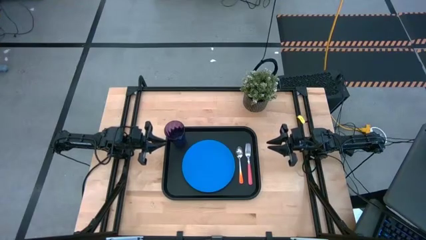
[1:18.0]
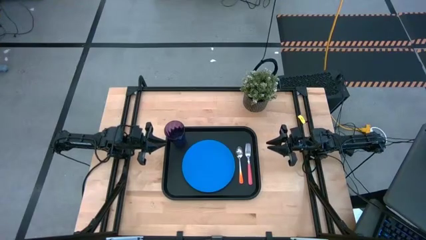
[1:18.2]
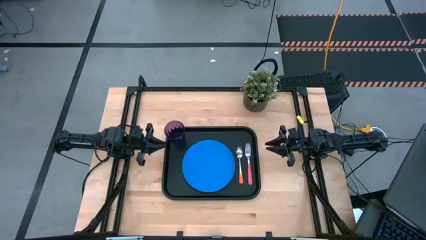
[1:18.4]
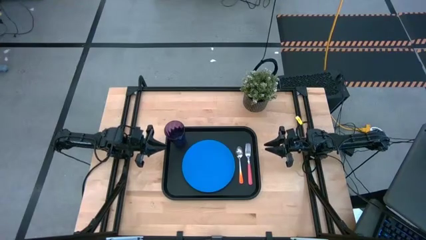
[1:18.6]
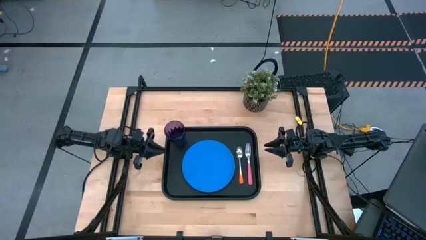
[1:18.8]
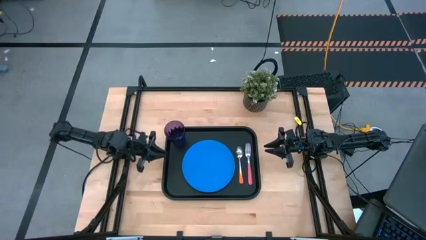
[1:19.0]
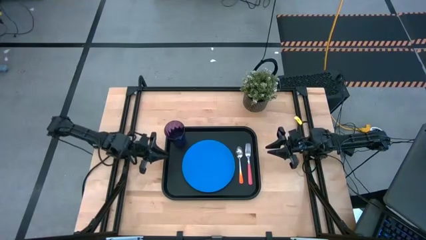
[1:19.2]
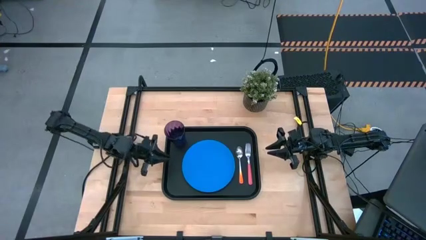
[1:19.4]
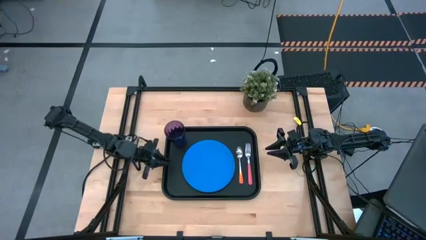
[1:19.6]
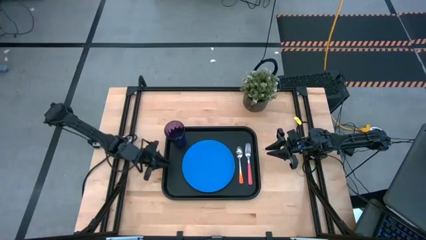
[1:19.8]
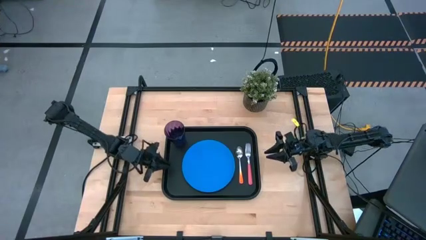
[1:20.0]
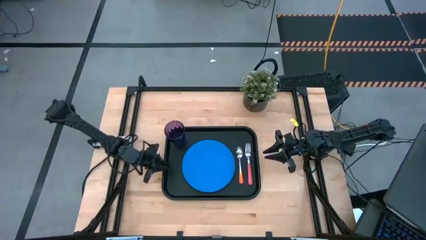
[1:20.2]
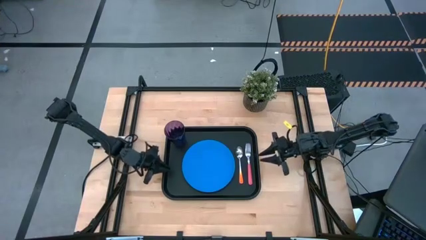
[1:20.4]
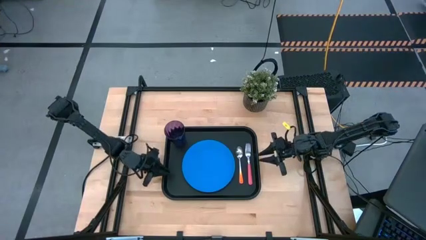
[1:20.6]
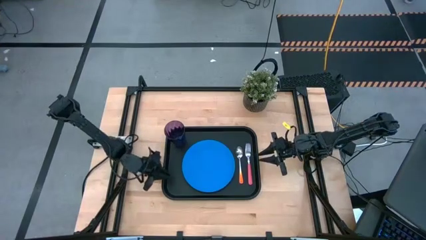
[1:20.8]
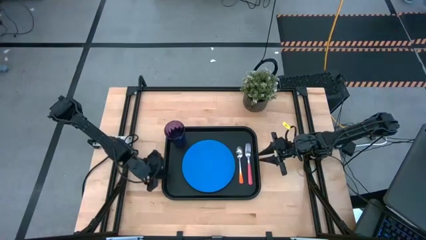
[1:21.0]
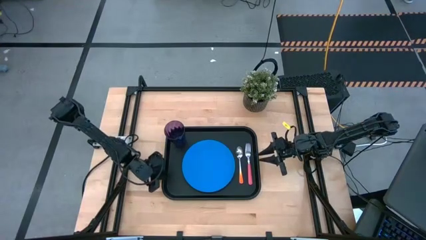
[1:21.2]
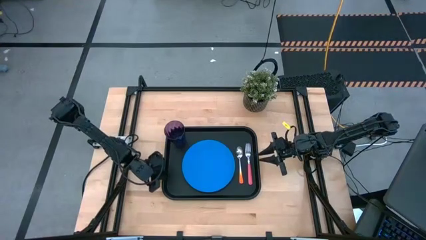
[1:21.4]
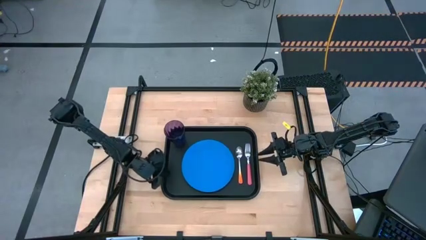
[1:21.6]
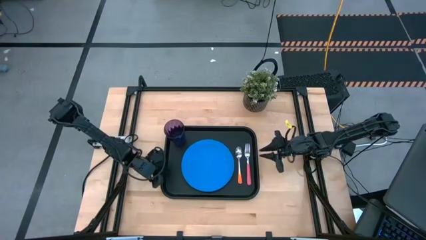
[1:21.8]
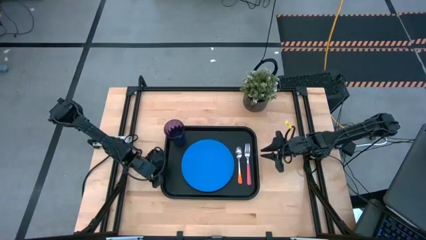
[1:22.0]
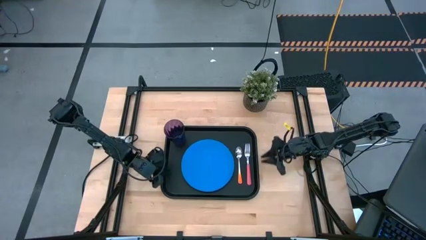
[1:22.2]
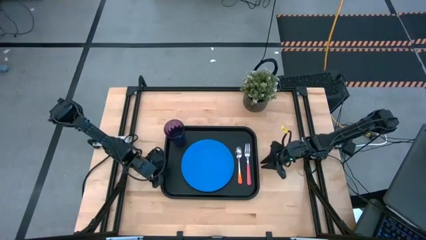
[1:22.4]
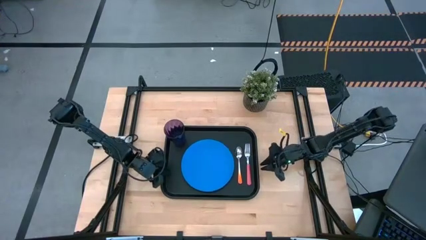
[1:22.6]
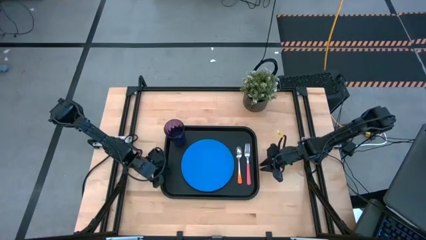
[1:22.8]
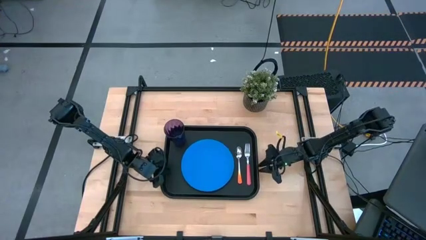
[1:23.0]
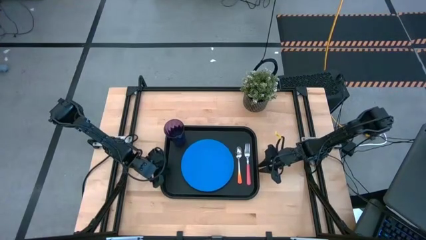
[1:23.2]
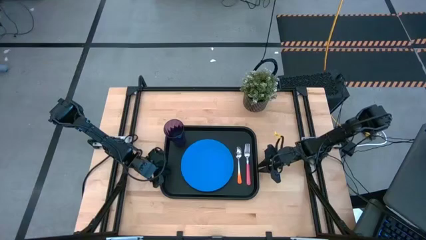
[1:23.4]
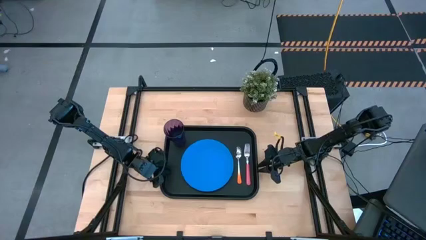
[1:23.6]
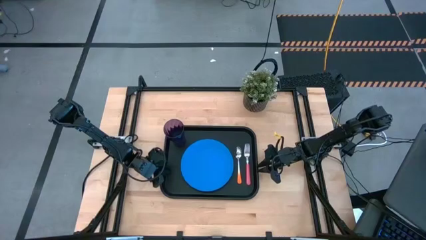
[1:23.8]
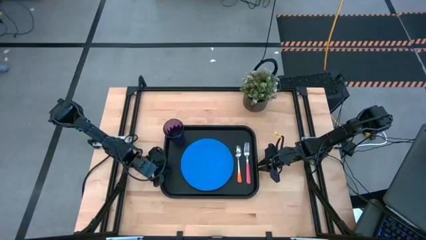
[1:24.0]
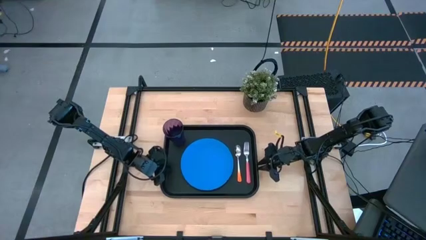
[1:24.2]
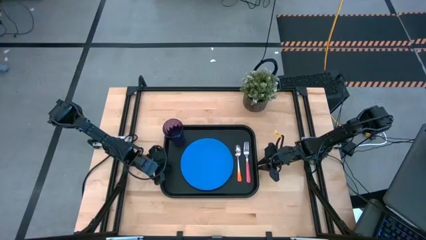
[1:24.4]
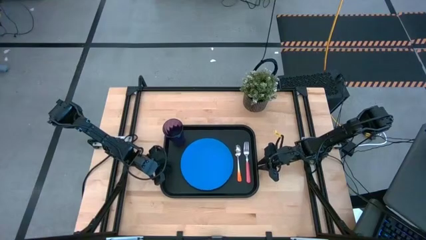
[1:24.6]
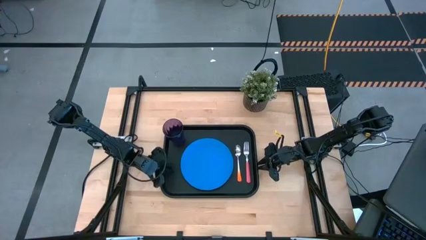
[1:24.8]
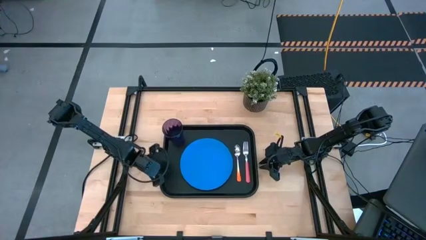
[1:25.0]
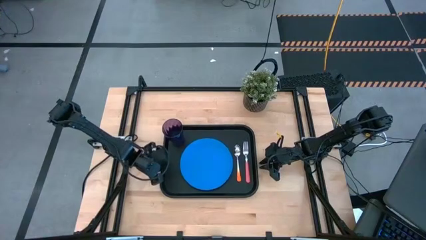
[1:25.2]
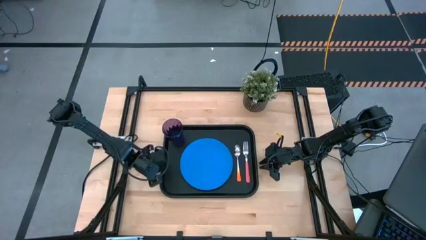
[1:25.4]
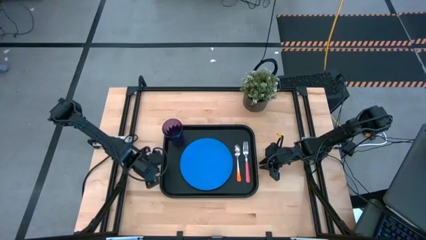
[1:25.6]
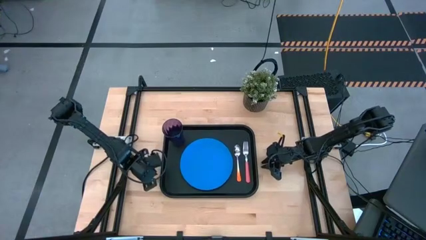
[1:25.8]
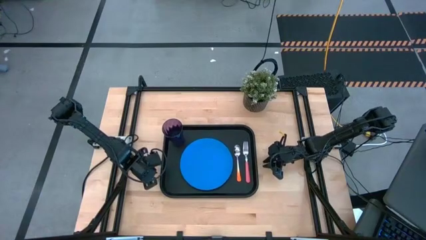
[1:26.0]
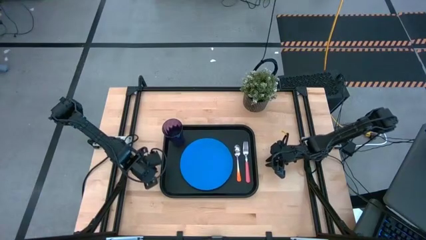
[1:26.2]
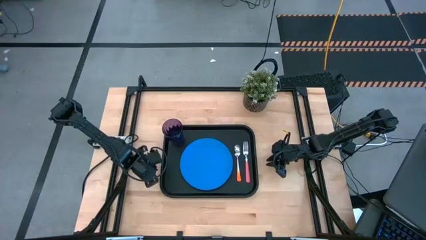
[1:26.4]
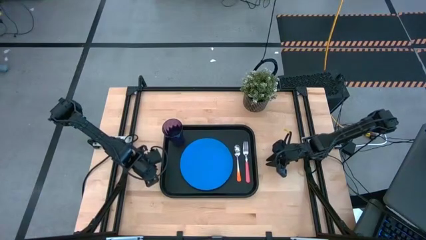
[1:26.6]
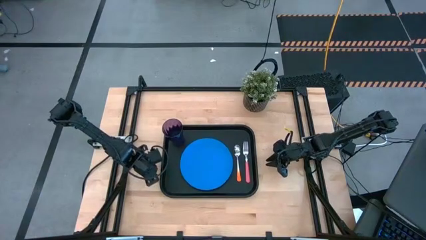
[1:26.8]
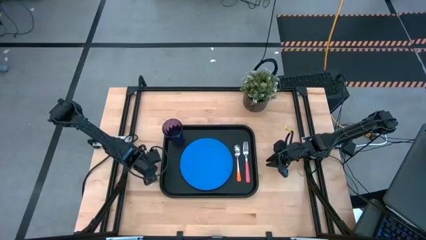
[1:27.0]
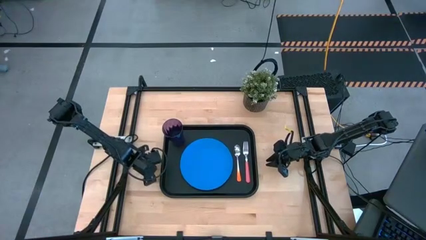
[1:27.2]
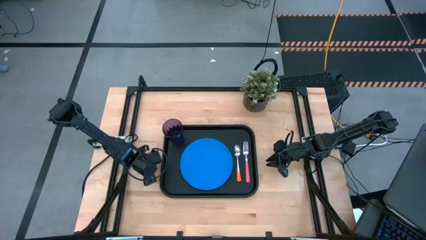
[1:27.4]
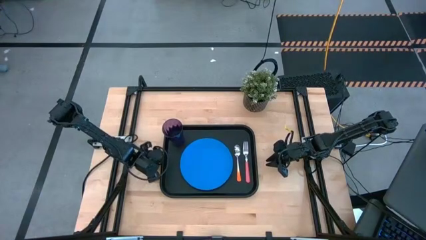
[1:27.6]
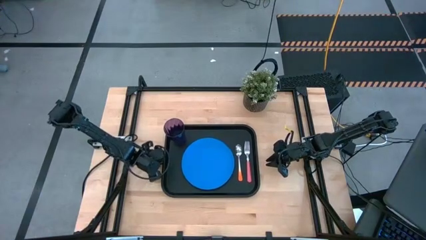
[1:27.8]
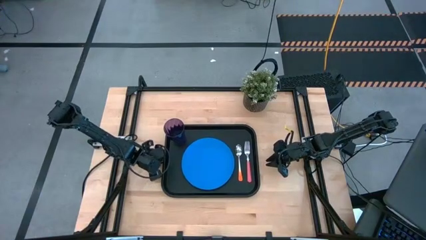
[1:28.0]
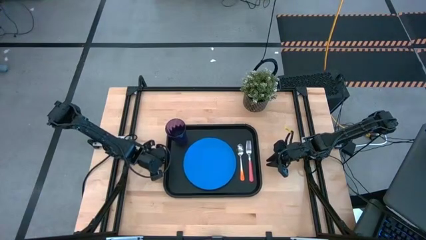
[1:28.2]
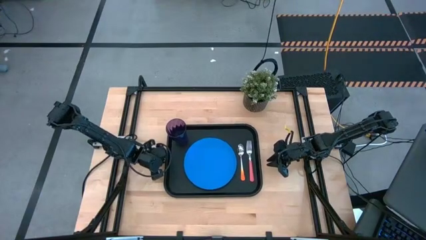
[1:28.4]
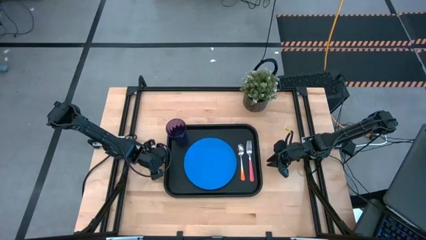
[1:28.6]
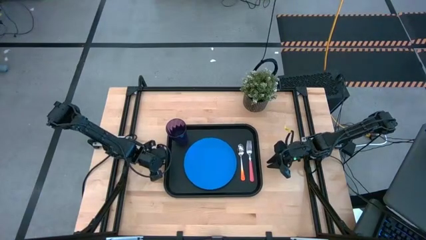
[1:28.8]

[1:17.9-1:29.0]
Task: Pick and place plate/cup/fork/spoon on tray
Adjust the black serving tray

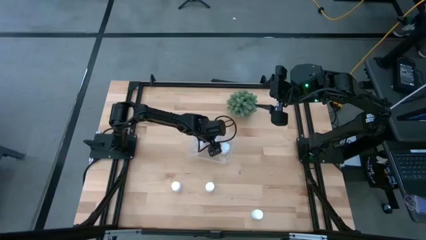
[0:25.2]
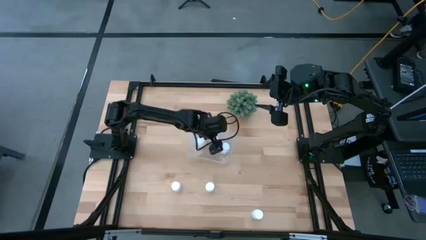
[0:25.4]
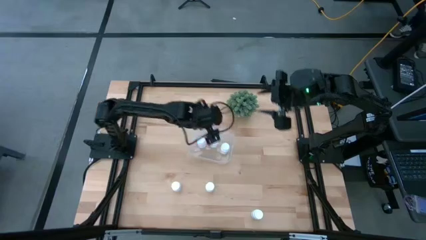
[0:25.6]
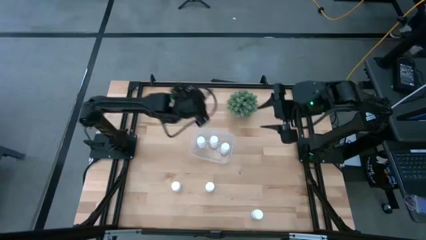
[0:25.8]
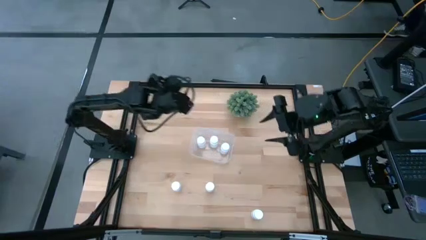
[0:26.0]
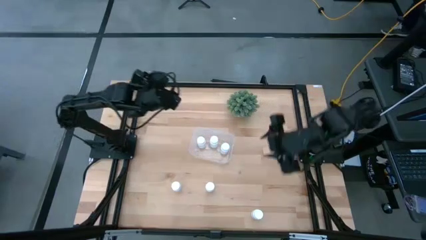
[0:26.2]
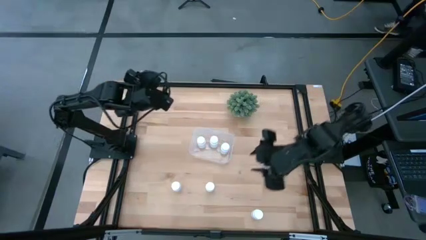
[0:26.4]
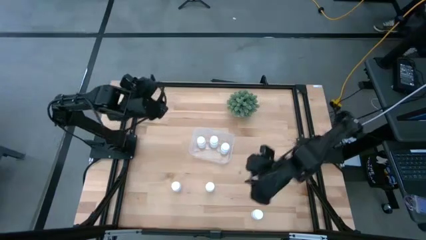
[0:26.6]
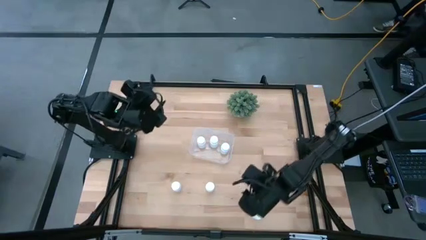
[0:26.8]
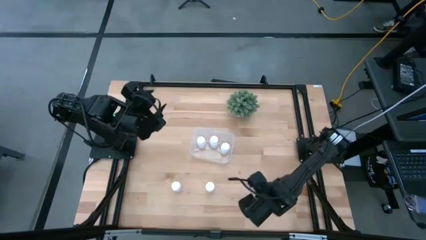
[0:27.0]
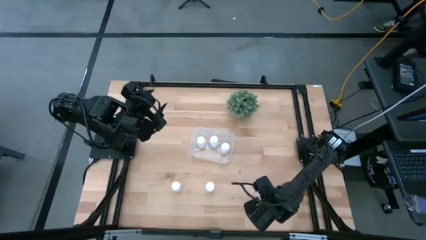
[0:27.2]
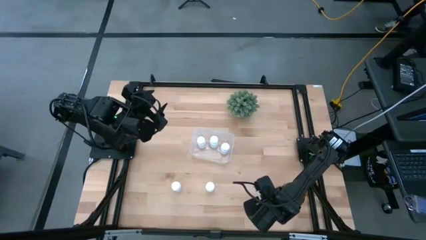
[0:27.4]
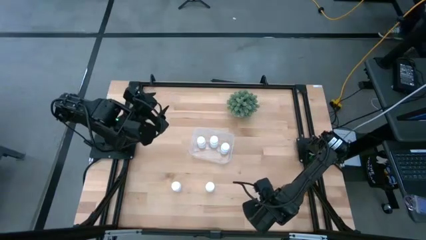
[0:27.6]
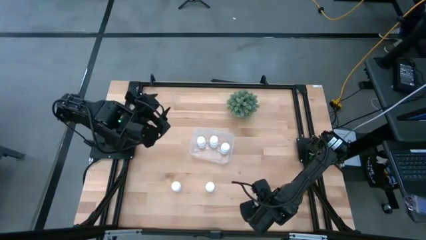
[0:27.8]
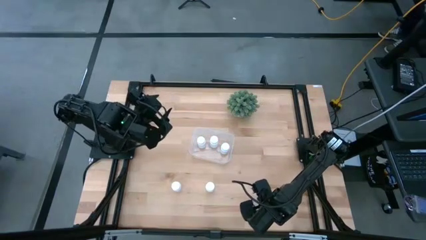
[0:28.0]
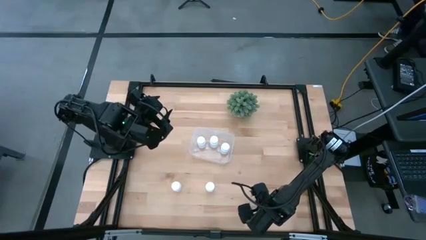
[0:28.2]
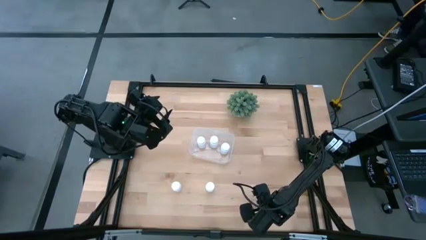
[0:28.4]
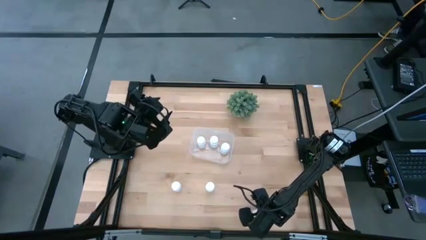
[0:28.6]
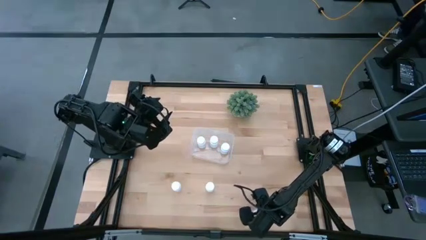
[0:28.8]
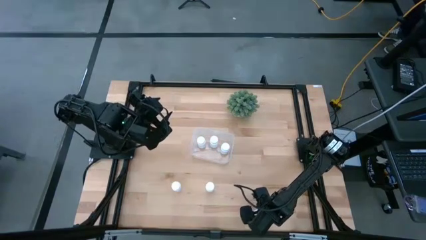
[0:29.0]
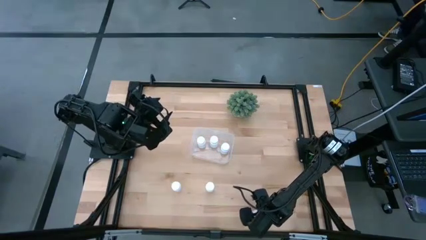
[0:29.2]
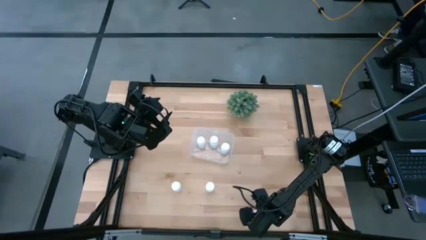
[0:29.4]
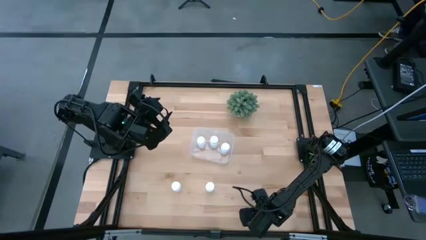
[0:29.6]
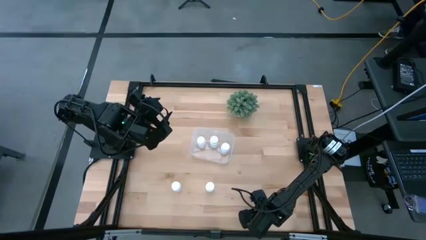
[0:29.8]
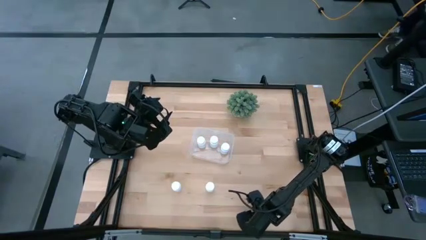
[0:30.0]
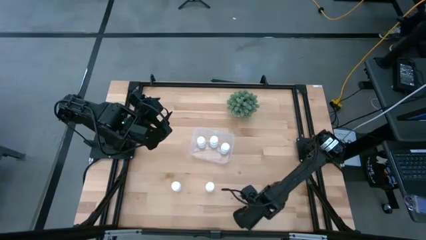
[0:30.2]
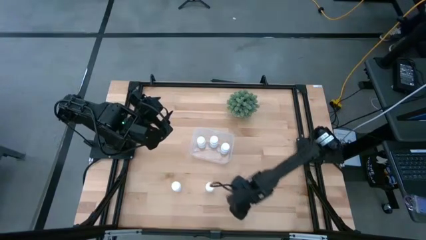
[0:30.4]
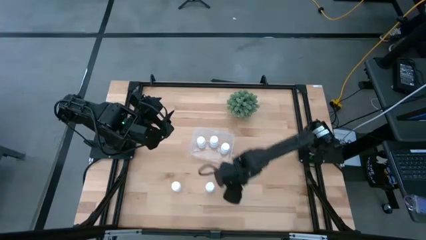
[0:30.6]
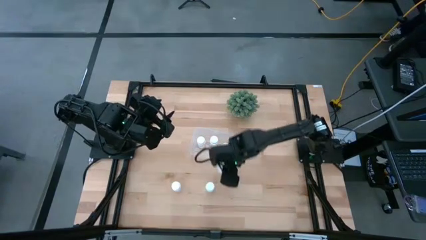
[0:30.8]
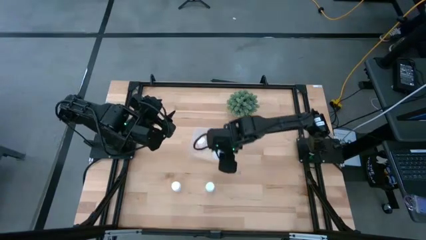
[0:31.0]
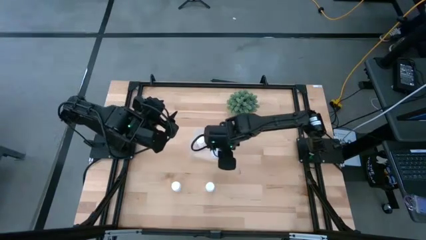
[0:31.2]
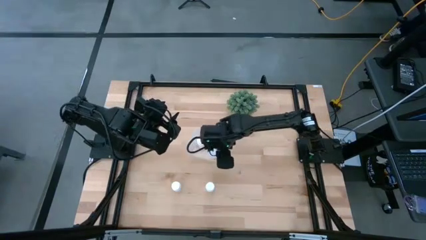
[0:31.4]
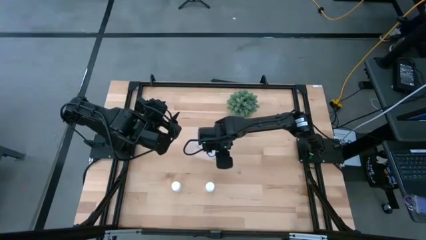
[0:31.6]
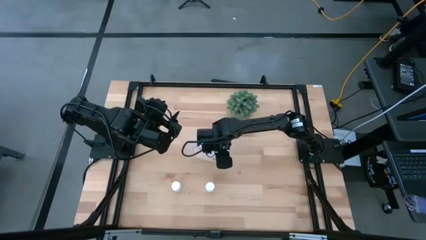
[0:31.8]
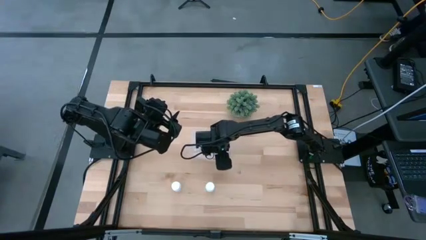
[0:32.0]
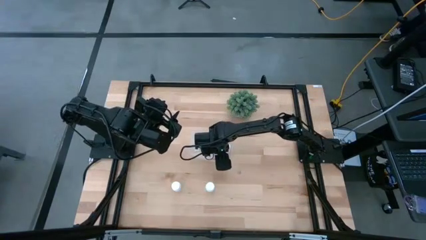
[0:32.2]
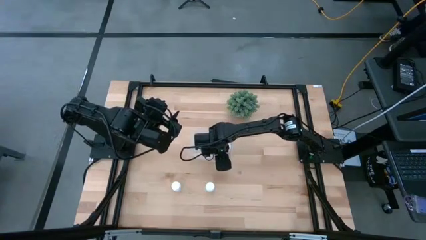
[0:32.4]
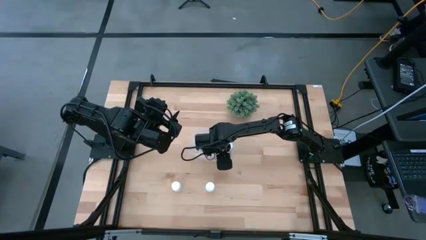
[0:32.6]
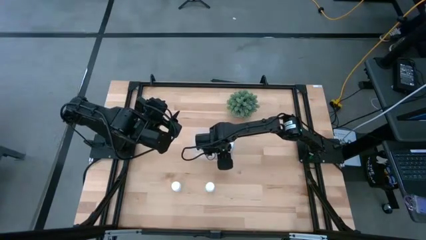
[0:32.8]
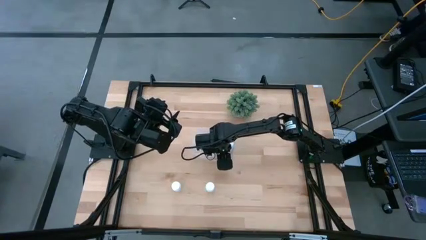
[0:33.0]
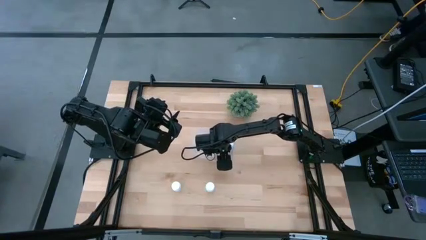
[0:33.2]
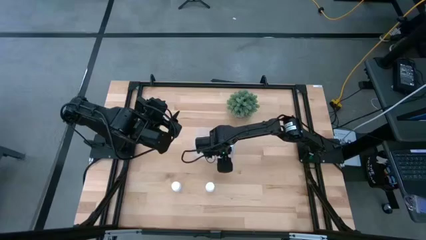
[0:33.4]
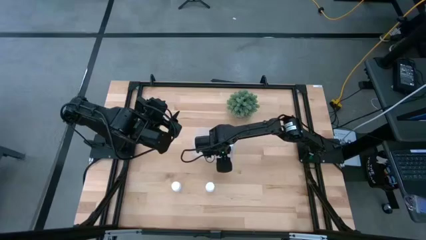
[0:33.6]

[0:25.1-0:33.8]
Task: Pick and place pill bottles into a basket
Put the bottom white pill bottle into the transparent bin
